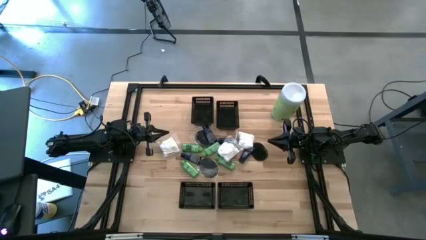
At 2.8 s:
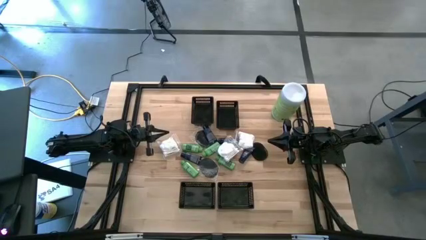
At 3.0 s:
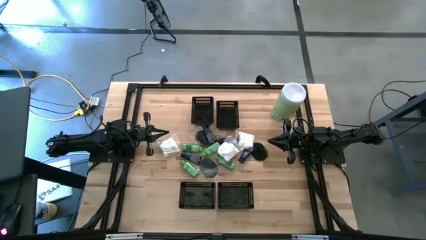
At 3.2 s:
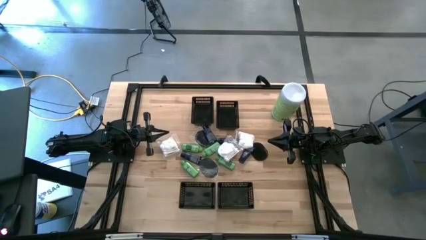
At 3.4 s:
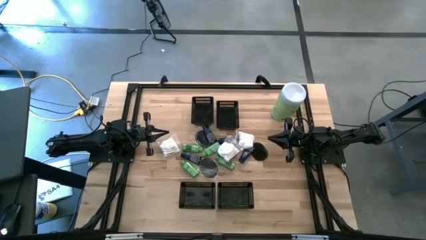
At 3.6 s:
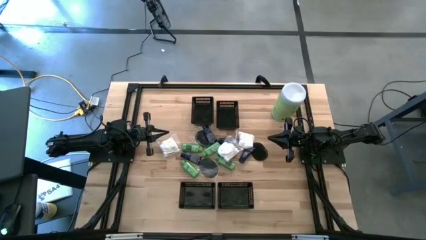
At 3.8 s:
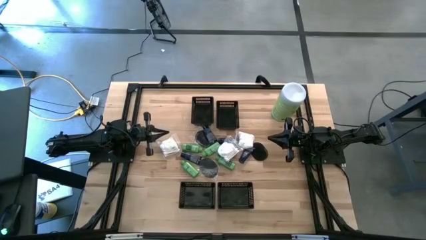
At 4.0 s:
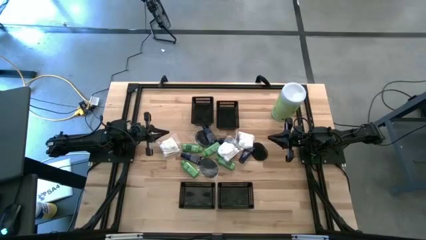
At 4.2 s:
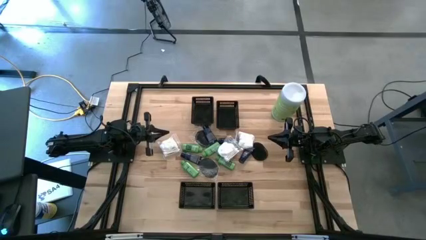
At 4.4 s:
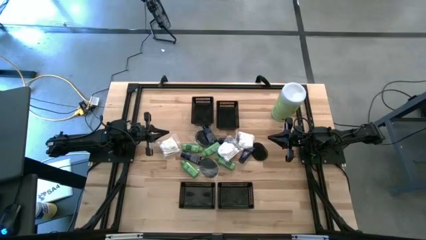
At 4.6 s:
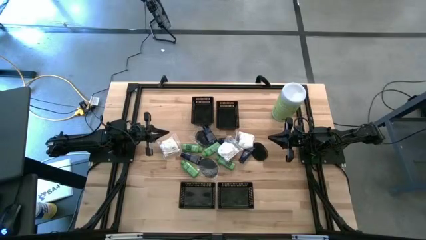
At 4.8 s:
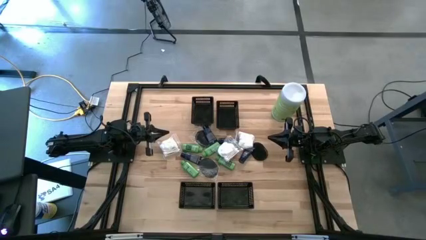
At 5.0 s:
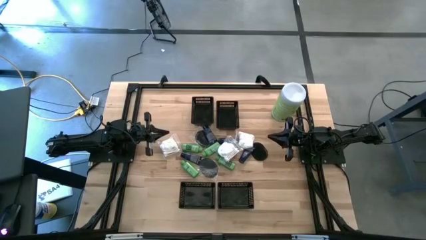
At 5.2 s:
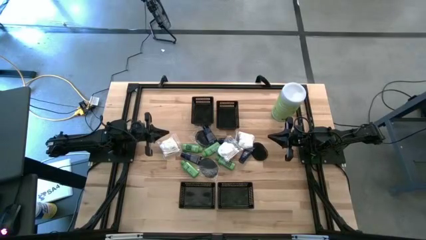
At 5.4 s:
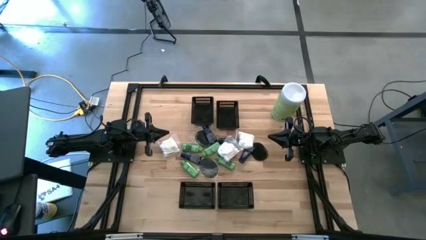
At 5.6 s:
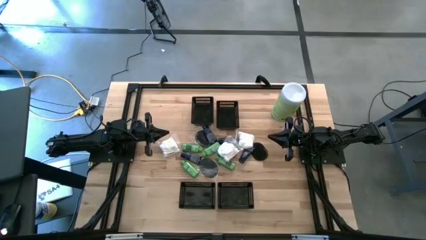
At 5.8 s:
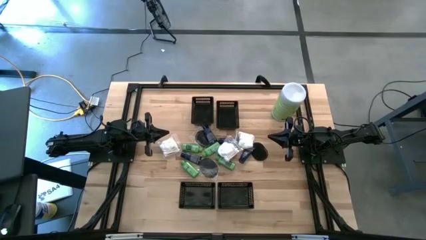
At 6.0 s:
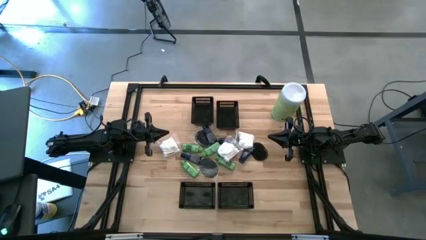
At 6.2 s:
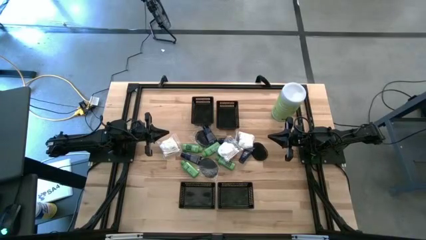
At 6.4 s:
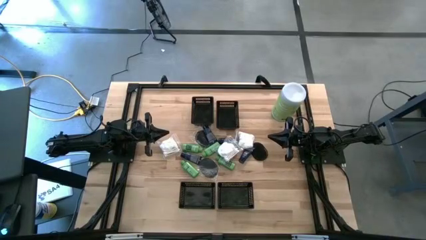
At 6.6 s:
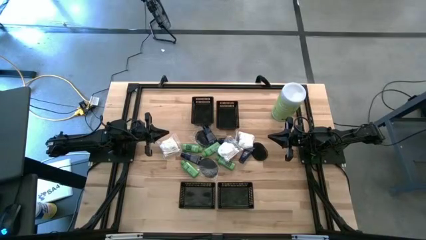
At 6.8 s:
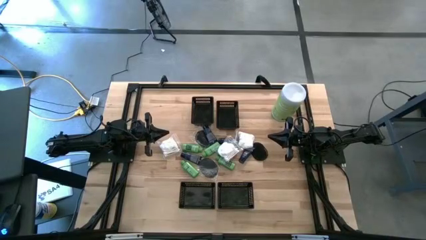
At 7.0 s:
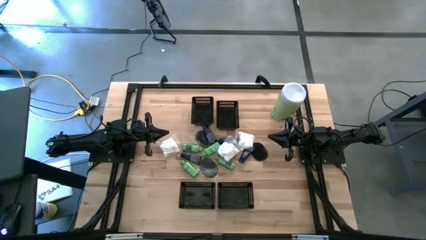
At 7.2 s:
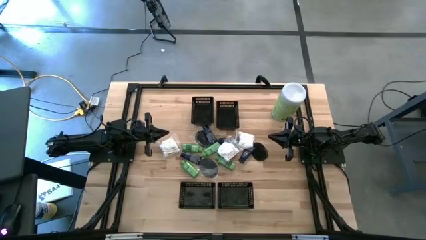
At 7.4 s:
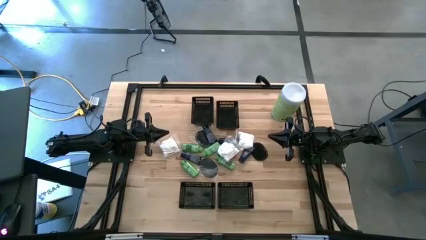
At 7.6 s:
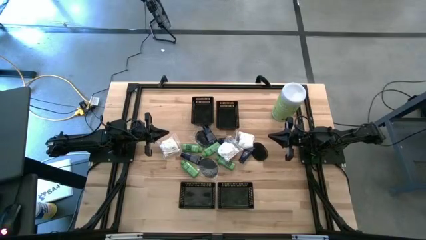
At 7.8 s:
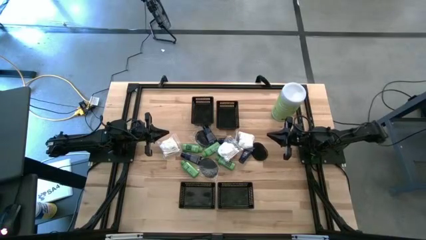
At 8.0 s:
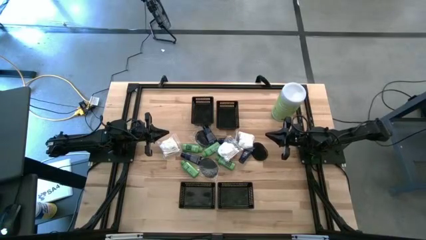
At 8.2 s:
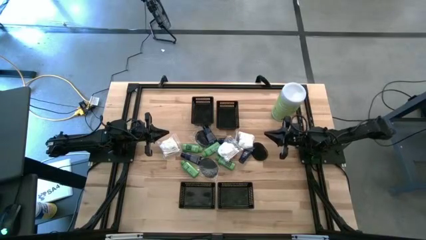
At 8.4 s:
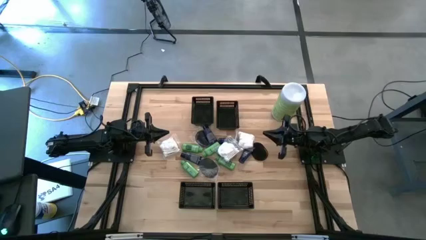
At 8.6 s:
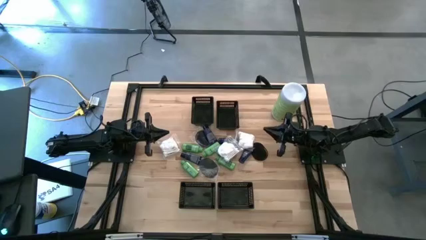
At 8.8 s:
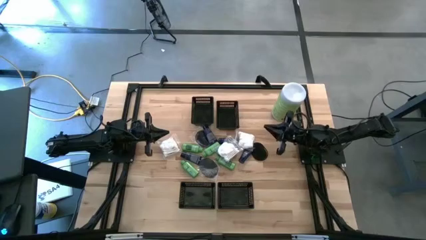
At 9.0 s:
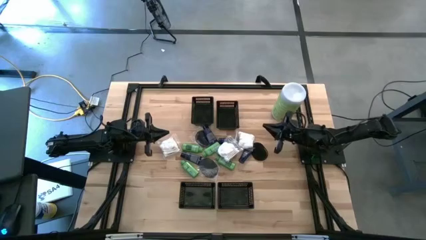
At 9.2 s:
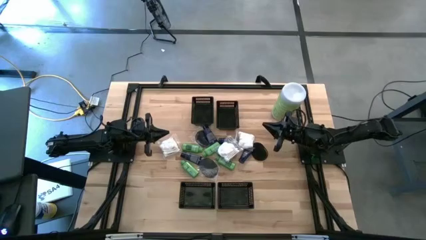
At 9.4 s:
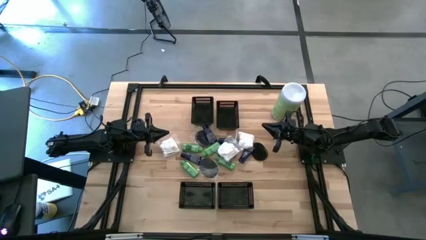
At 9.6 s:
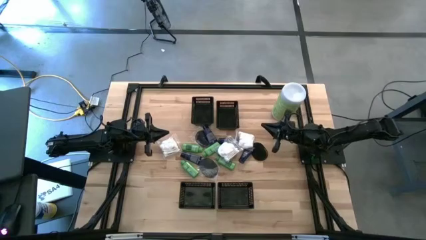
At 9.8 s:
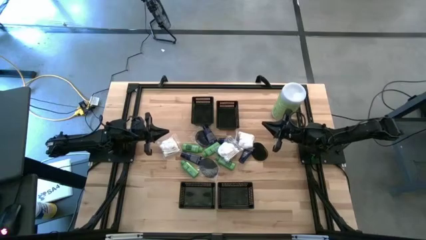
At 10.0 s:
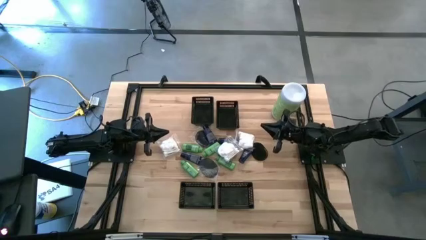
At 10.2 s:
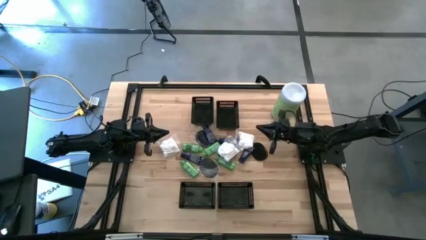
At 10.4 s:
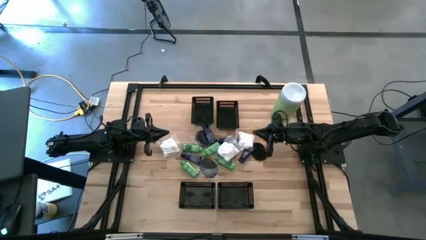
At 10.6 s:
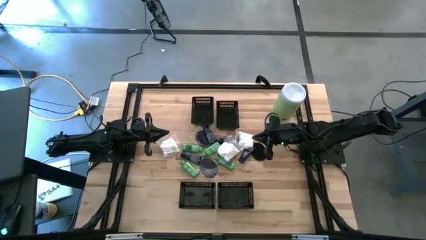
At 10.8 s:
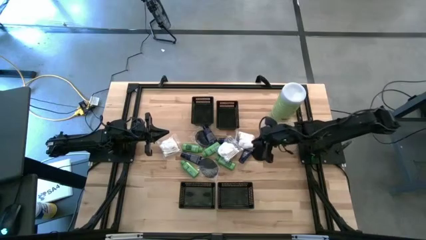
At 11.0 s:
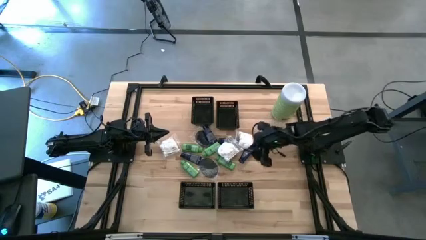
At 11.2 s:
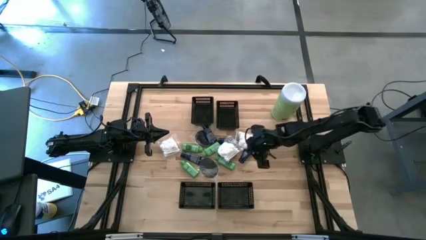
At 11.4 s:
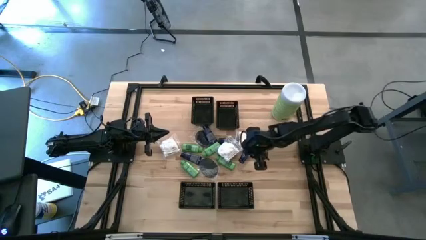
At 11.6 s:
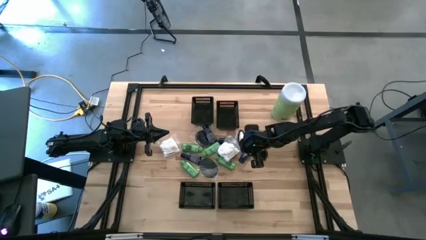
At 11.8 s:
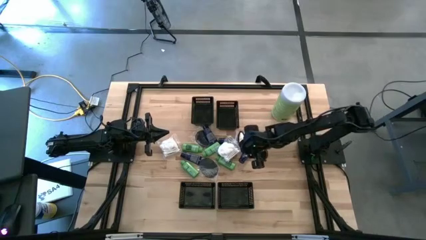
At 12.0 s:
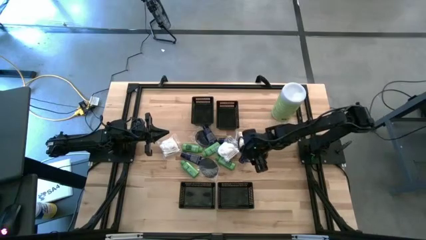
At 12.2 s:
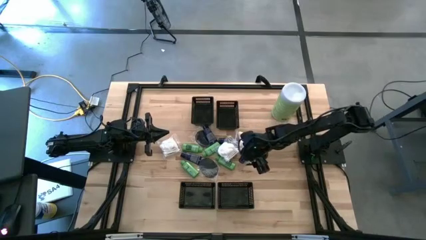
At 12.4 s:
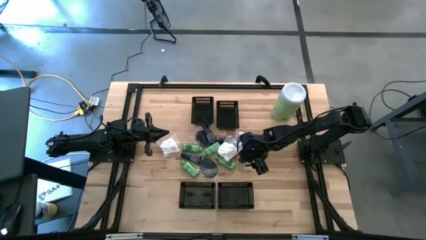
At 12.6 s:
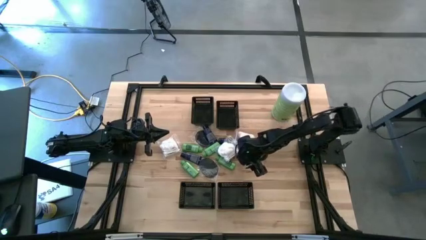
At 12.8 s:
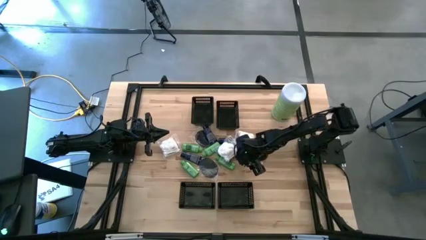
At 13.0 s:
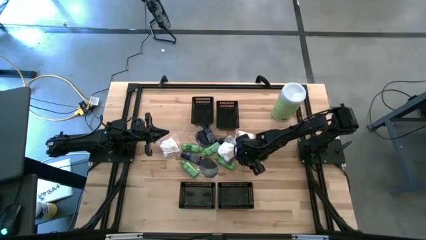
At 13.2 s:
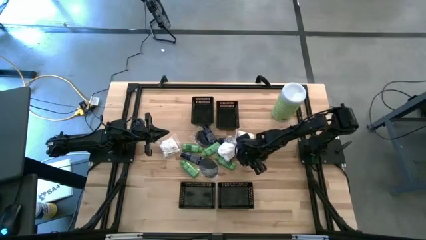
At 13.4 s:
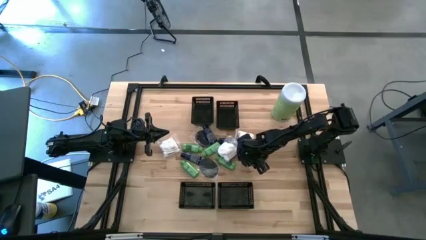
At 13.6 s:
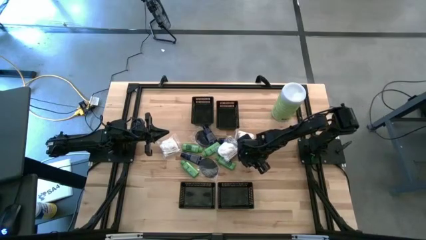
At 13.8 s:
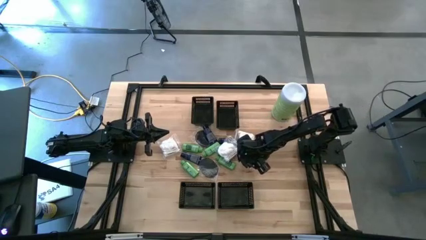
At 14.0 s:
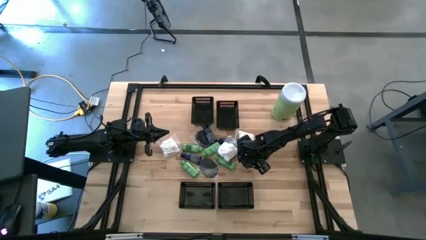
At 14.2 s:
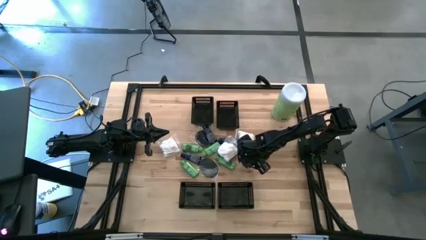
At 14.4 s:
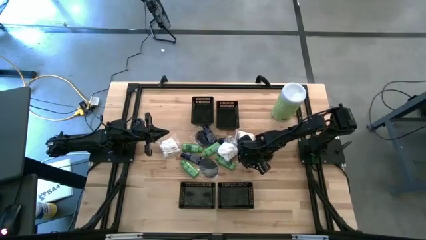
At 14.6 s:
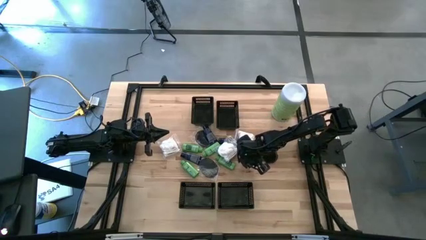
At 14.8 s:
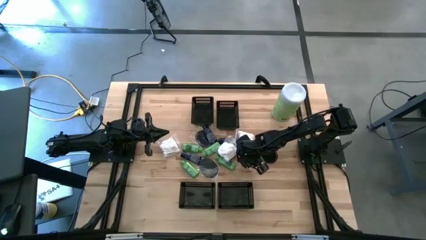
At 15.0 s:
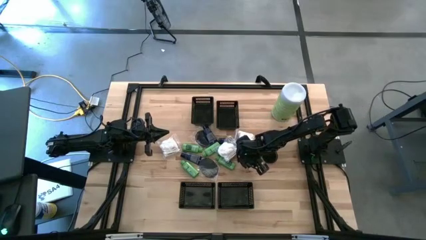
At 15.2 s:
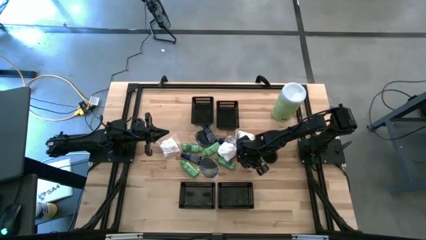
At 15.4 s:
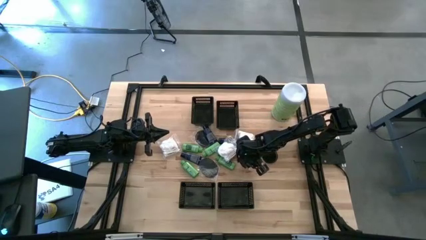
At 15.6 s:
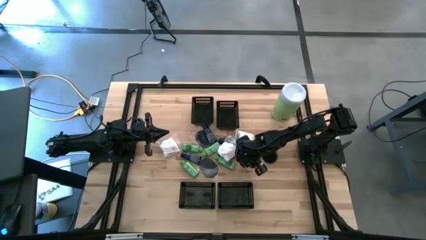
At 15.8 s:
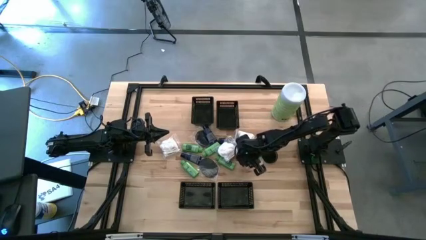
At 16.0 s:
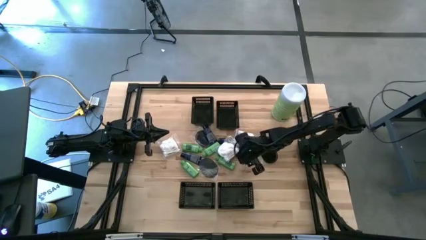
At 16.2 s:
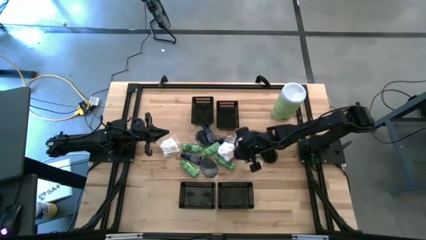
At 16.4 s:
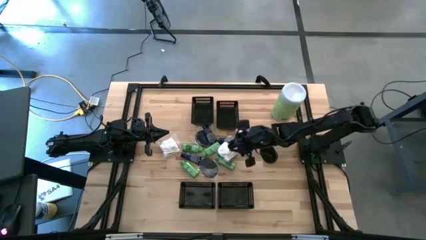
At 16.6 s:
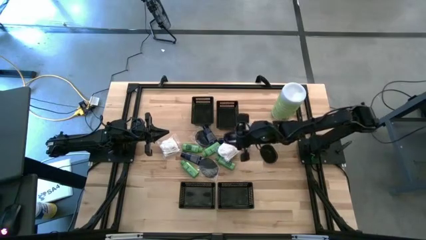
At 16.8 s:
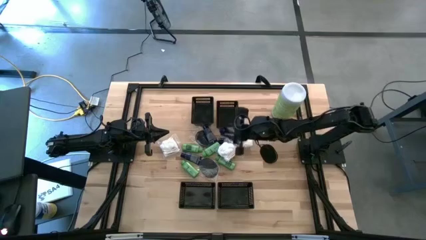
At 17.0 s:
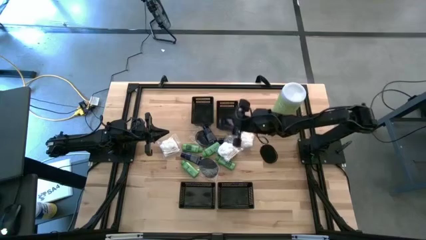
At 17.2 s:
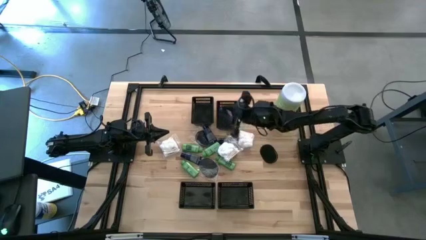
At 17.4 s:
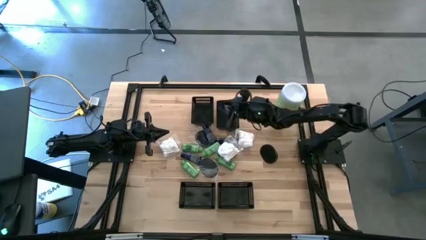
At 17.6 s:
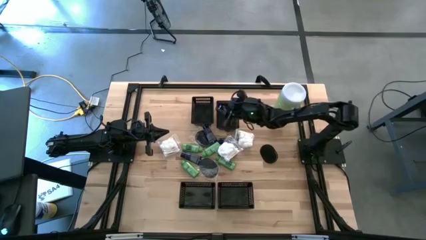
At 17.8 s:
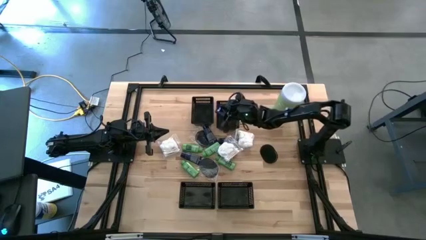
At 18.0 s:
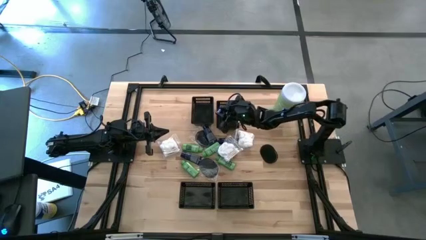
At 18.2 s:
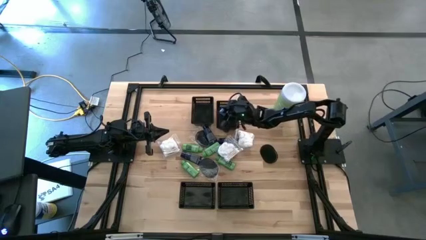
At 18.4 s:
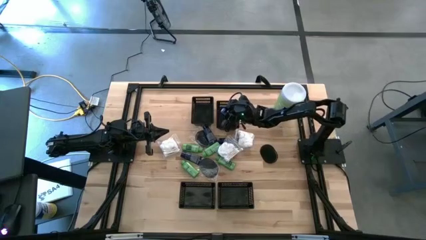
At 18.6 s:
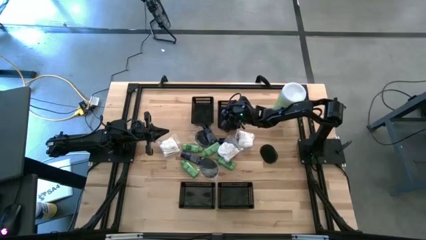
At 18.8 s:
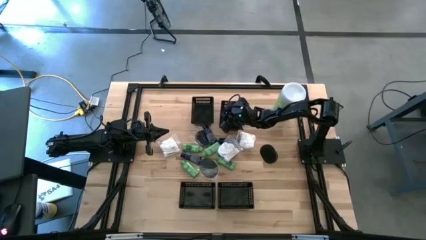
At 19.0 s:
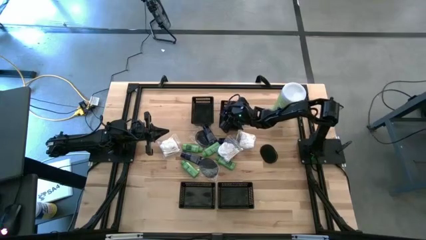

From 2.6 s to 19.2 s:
Task: Pick & Place Travel size toiletries
Put the blue shave cream into the top right black bin
